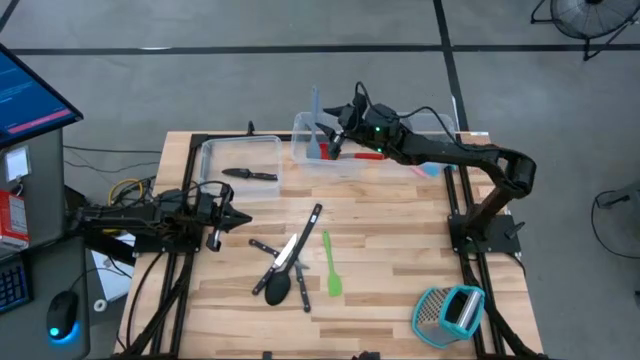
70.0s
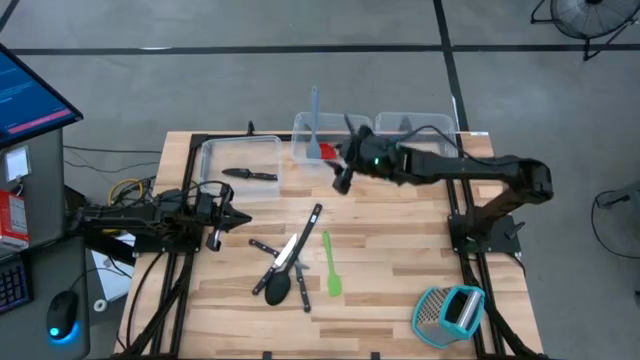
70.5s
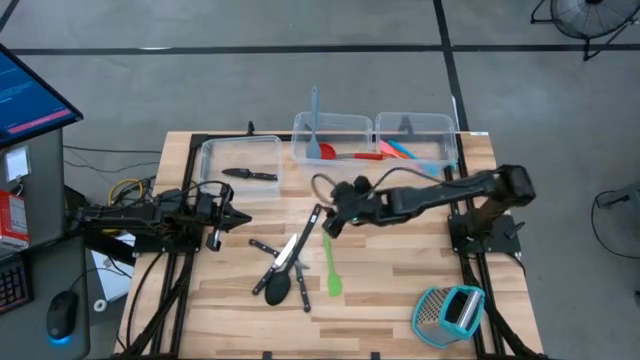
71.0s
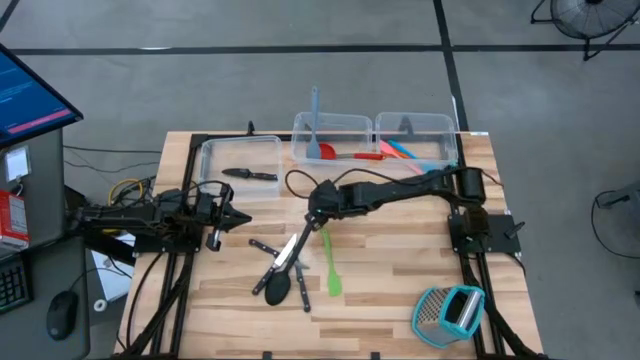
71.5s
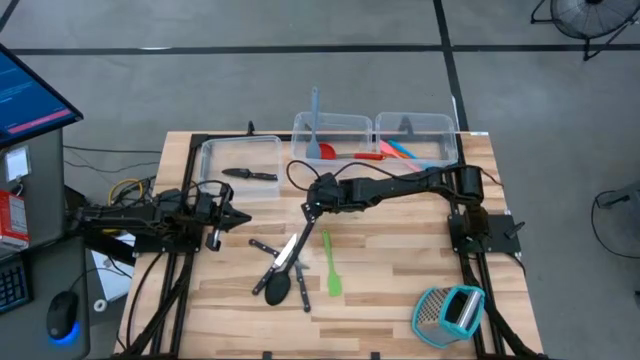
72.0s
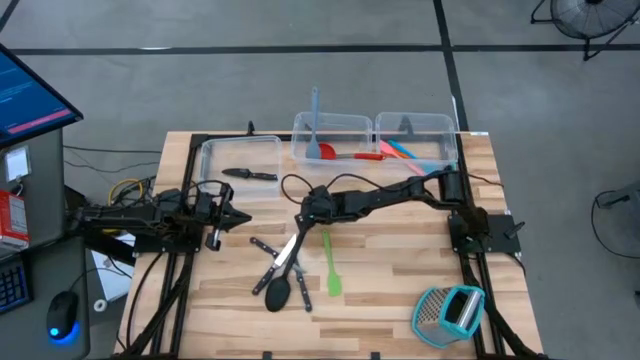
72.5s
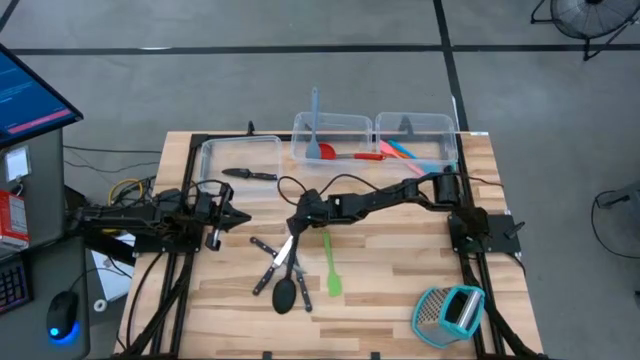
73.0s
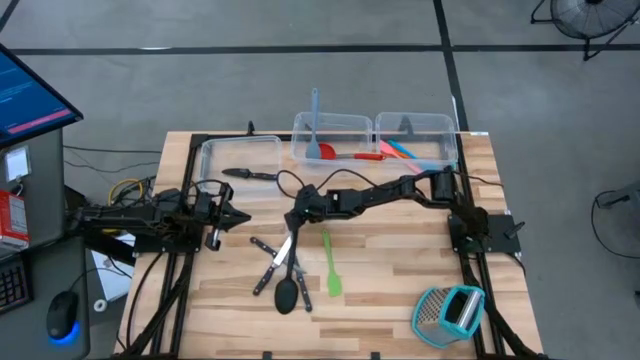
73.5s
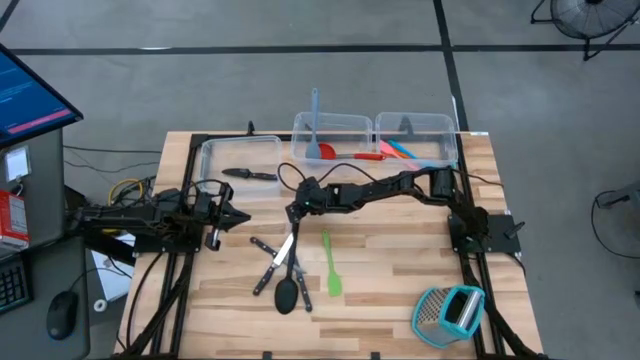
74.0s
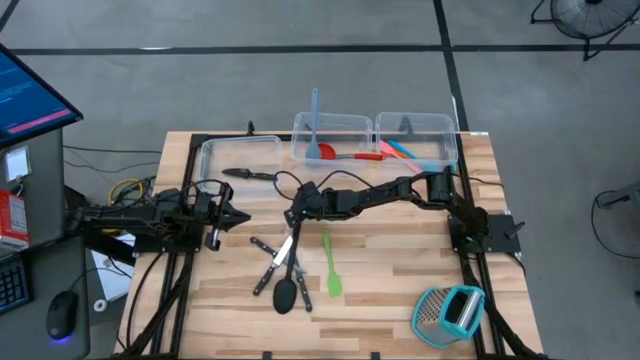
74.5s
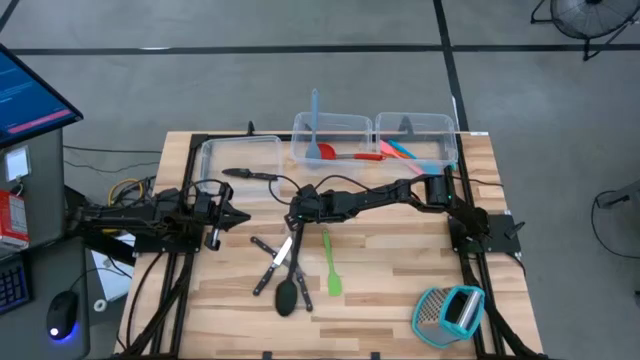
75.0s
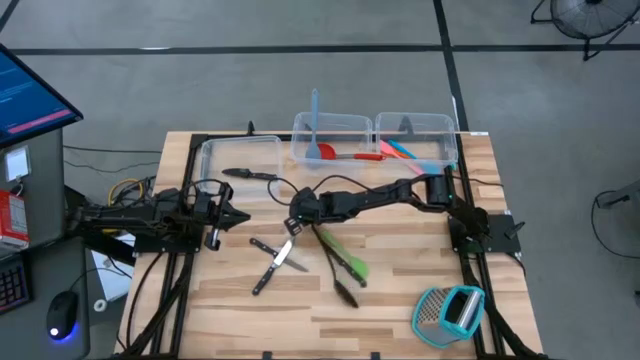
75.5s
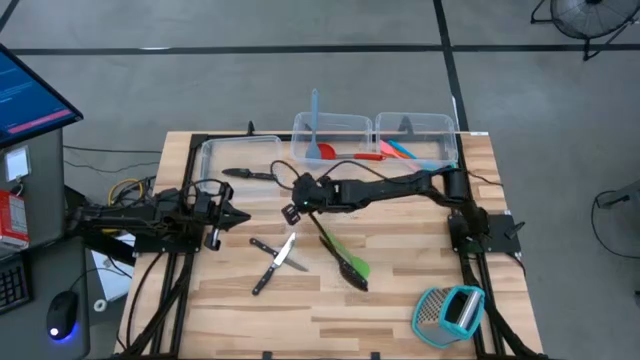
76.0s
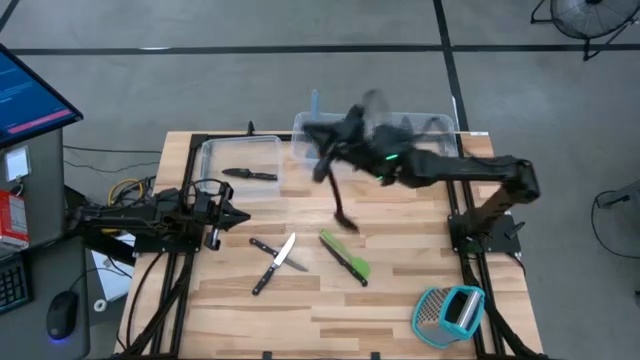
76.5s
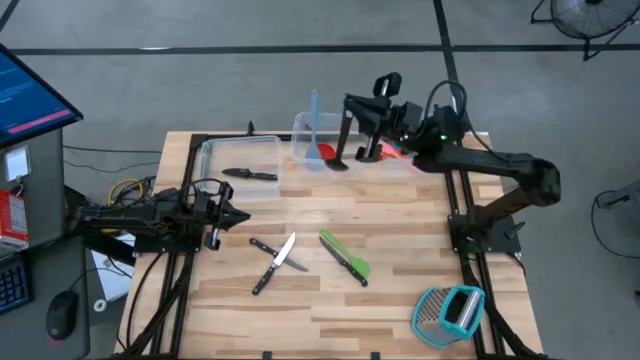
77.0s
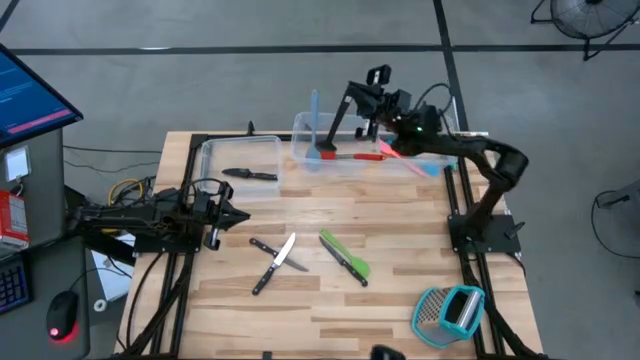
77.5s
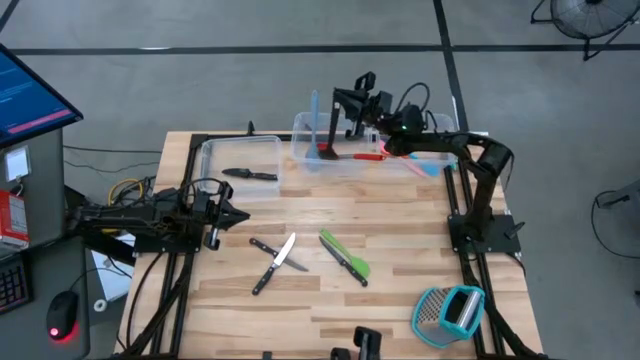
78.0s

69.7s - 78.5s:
Task: Pick & Place Kitchen Items
Put the black serving spoon into the top middle transparent bin

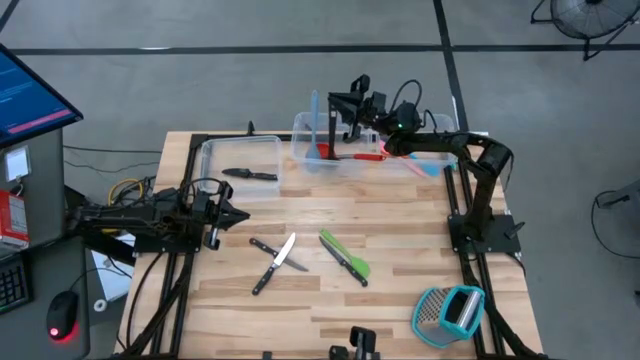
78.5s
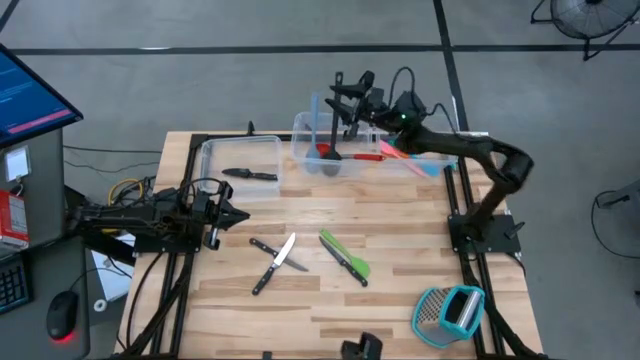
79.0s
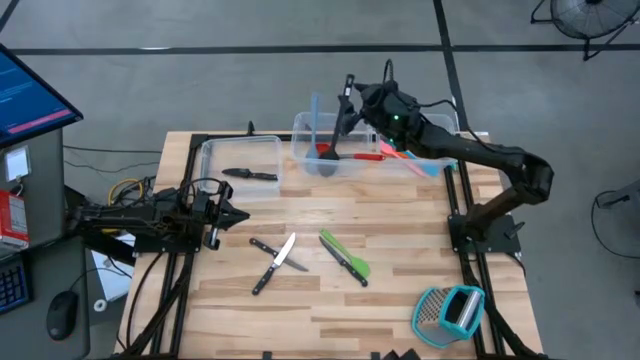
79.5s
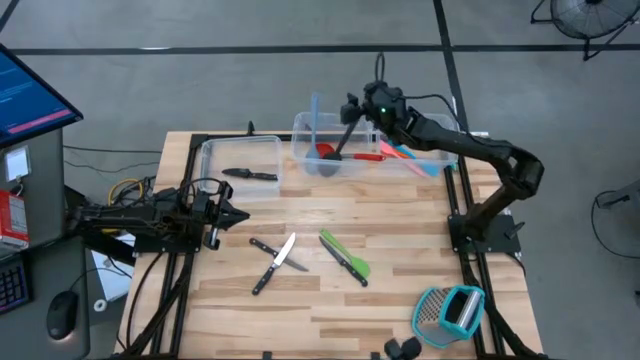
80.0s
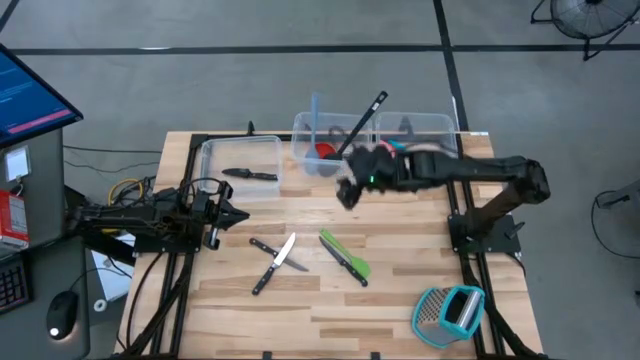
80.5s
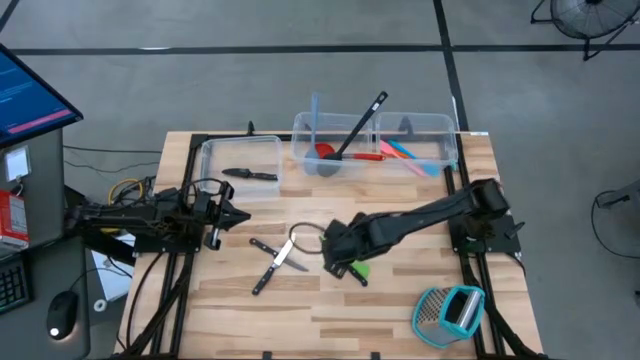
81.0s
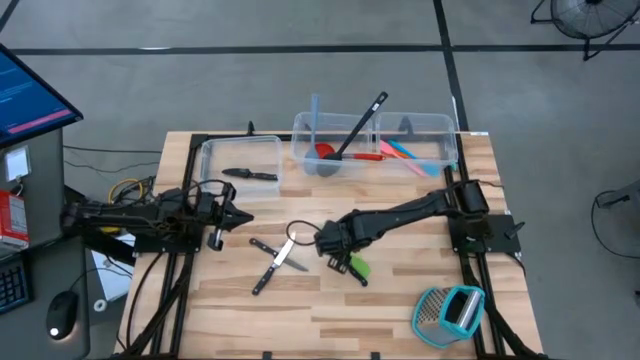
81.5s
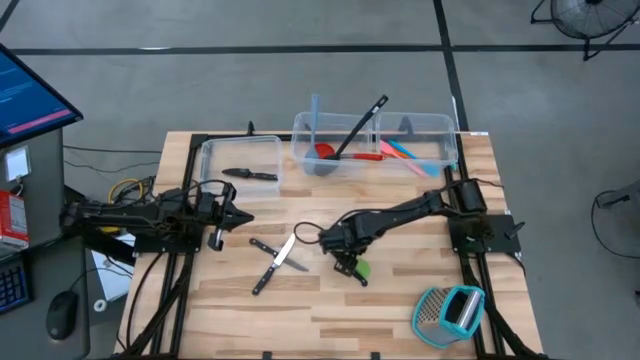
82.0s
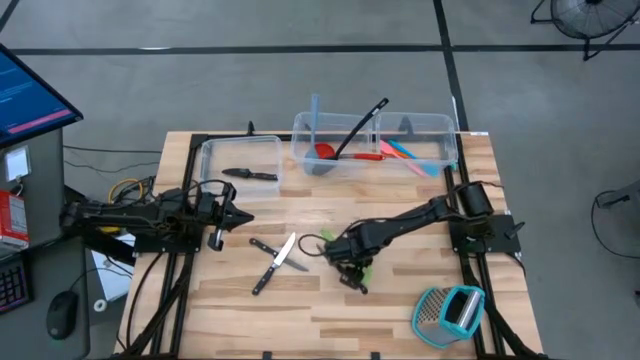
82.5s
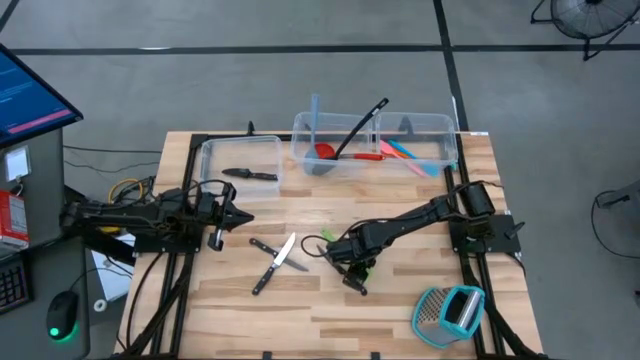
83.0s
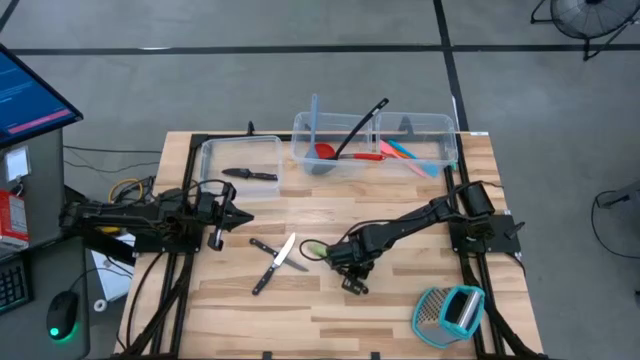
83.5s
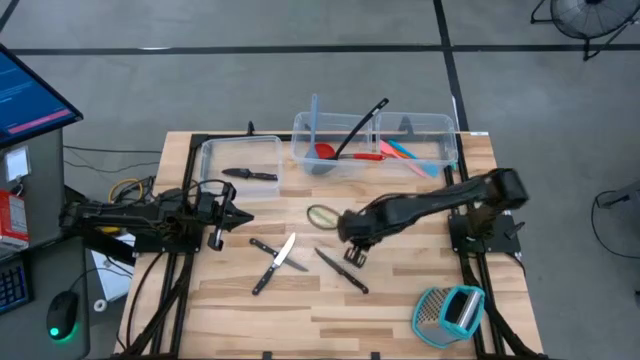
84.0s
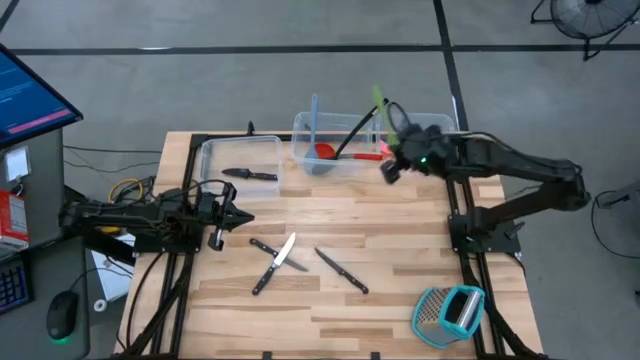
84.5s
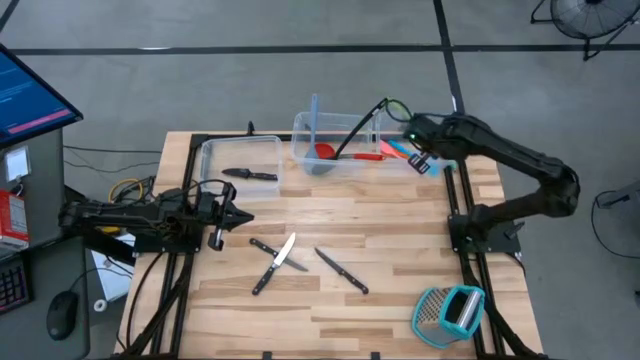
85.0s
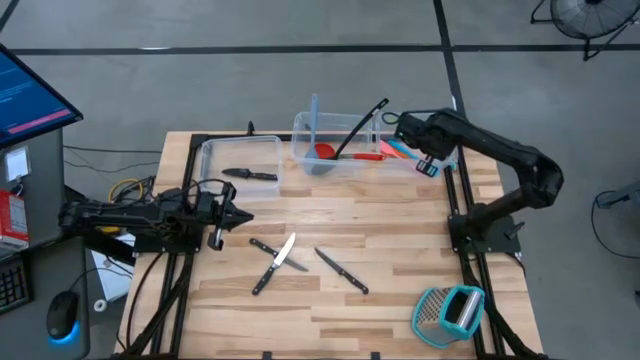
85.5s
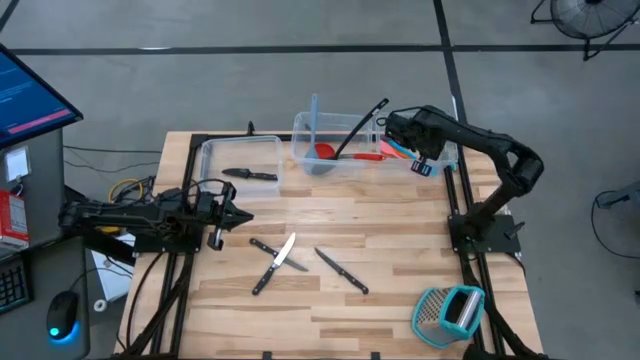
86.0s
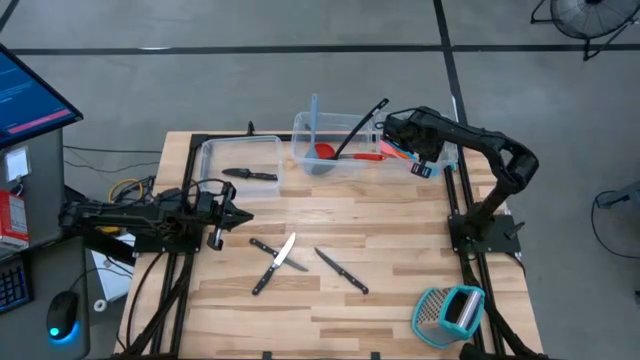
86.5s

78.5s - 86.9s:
Put the green spatula into the top right transparent bin

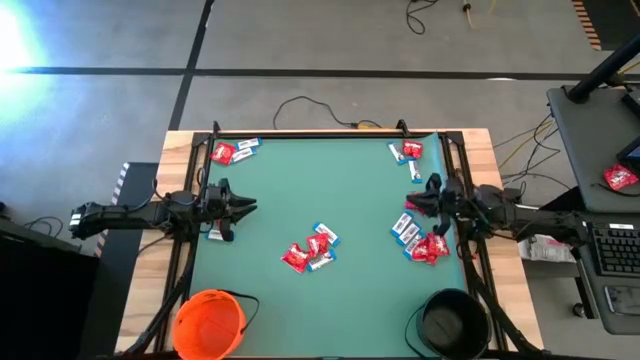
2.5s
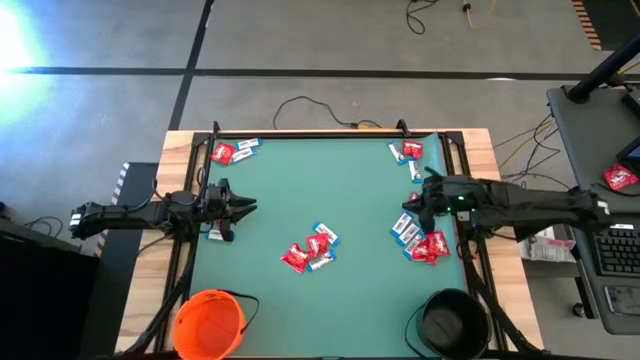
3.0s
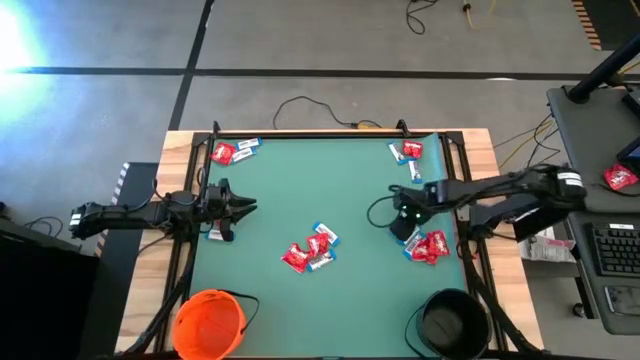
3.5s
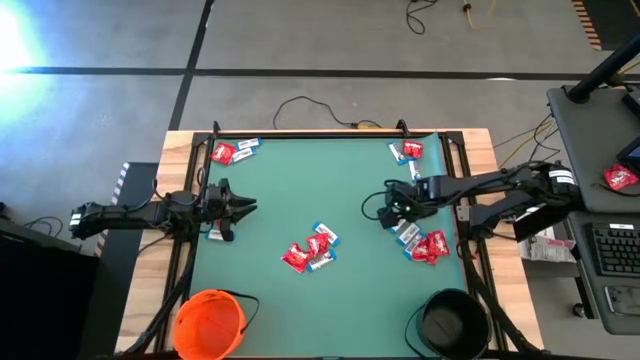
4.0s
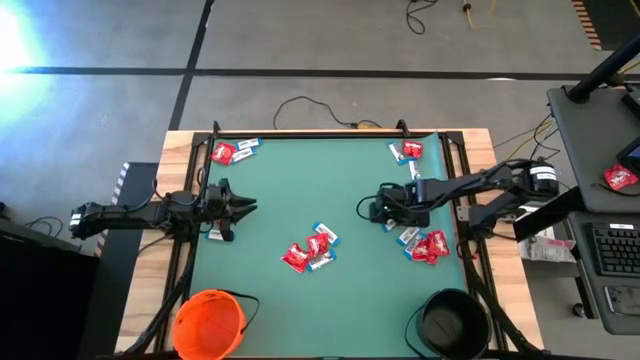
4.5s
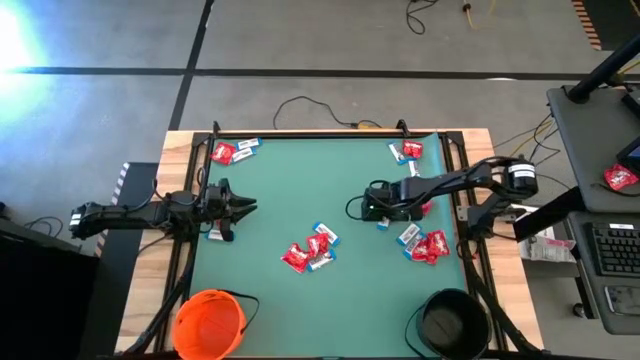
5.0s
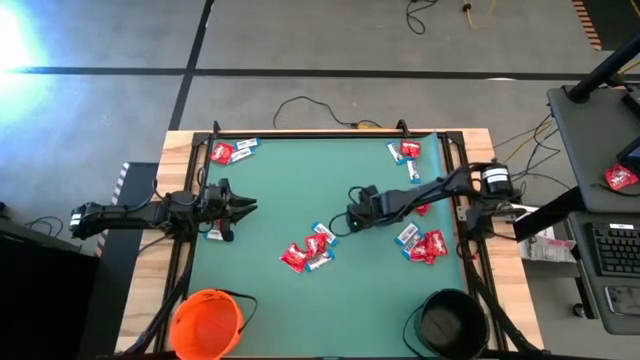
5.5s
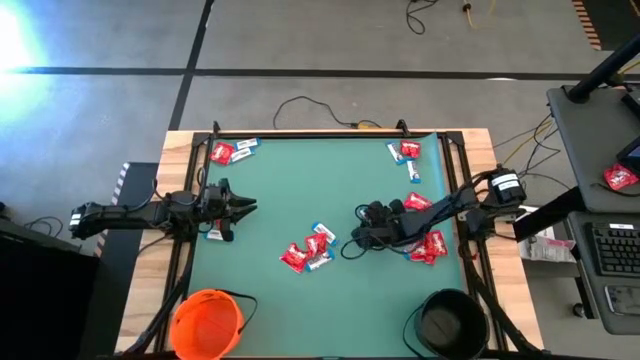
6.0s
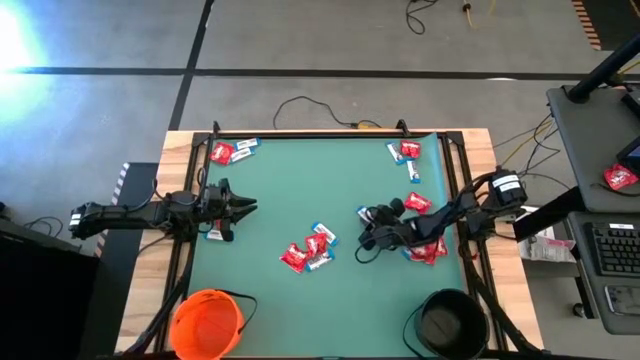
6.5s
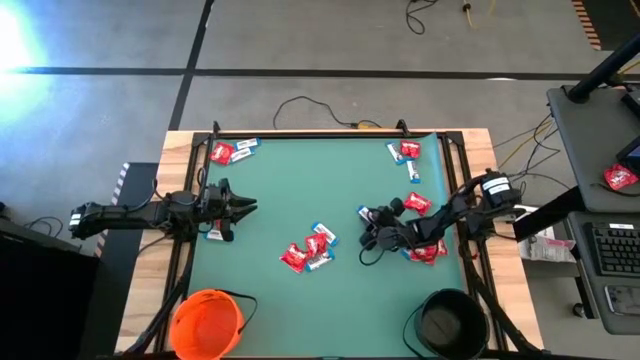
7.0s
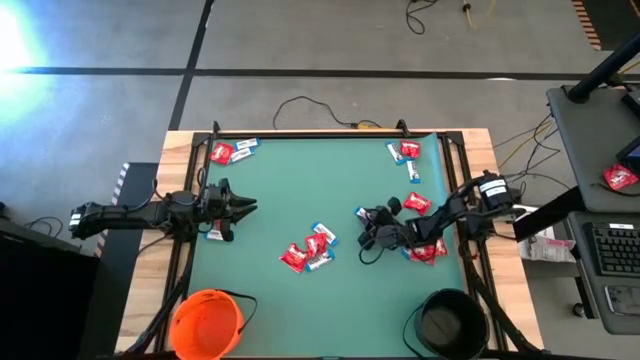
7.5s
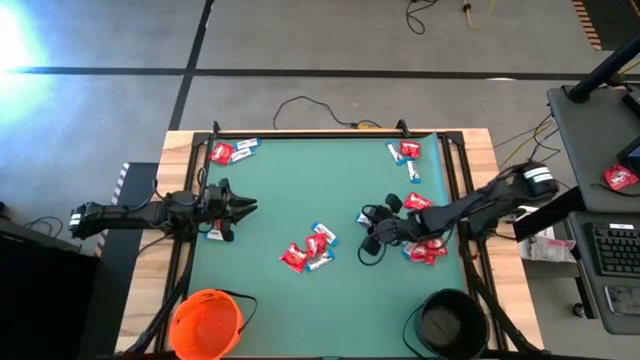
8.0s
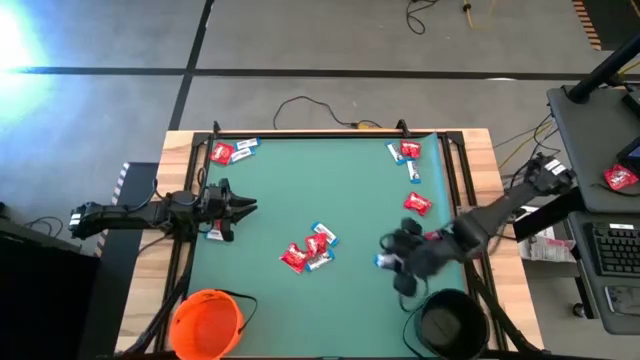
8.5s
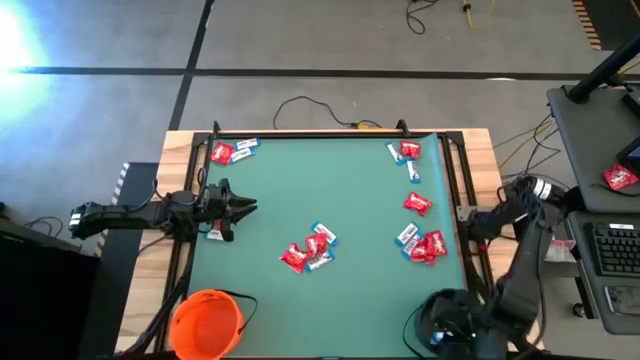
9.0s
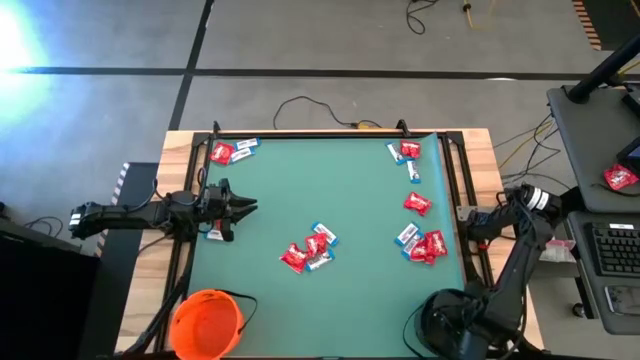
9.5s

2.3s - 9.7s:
Task: Sort candy by brand, put in halloween buckets
Put the white chocolate into the black bucket
